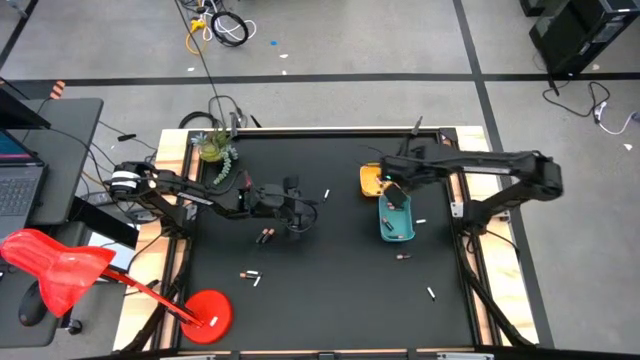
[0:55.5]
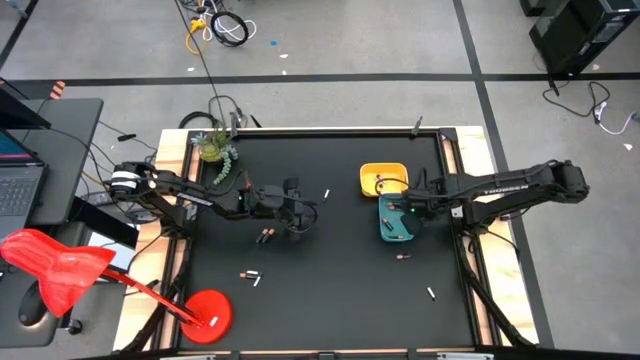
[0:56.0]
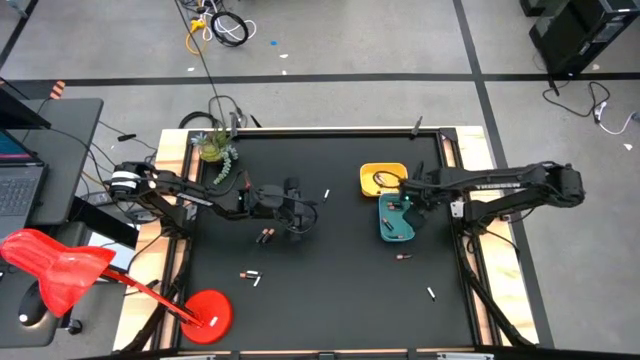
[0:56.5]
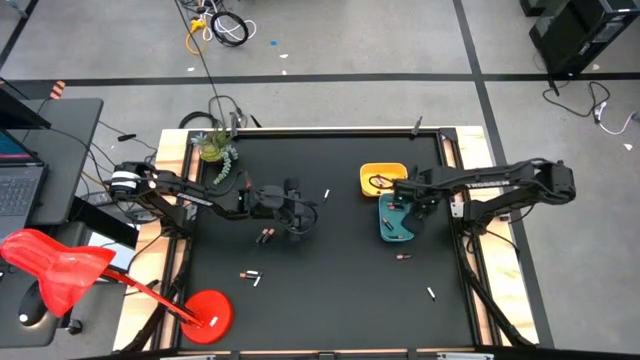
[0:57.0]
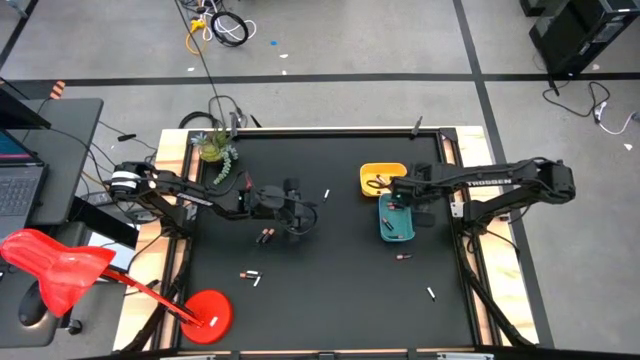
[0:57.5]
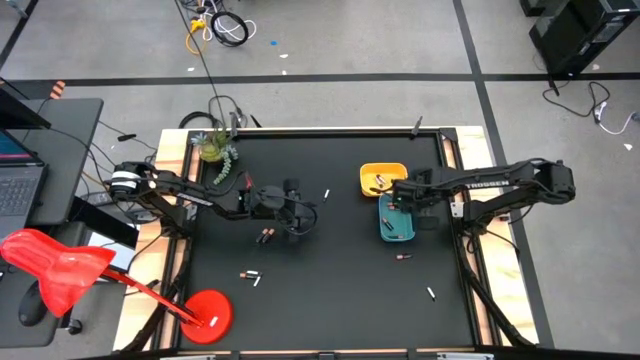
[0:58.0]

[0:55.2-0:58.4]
Task: Sort batteries
Put the silver black battery into the yellow bin

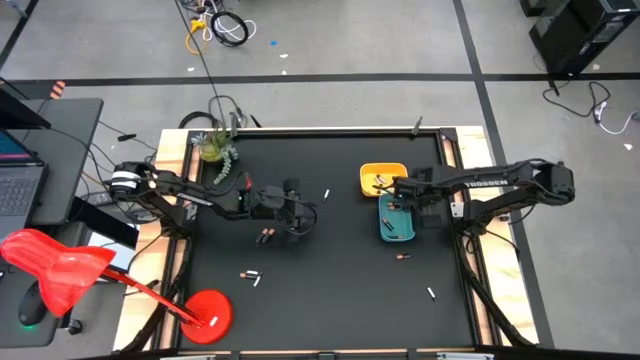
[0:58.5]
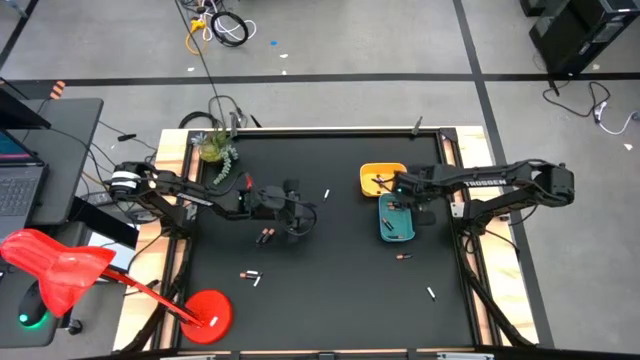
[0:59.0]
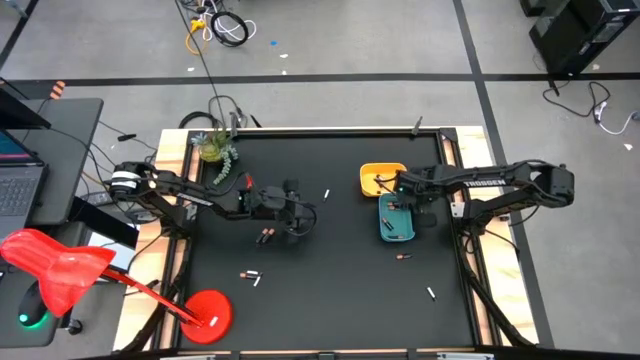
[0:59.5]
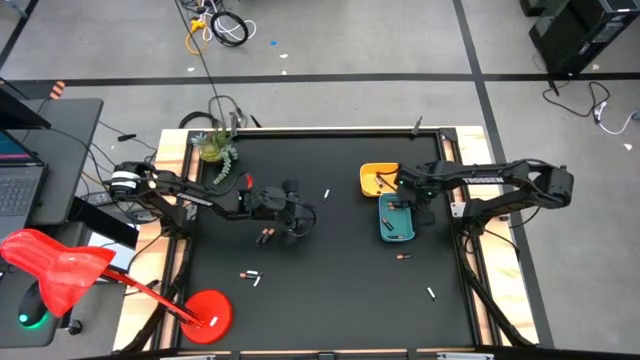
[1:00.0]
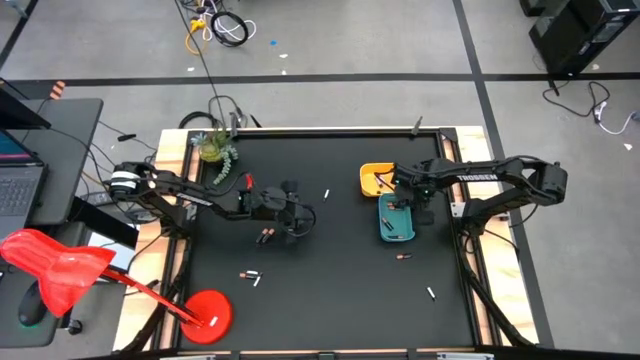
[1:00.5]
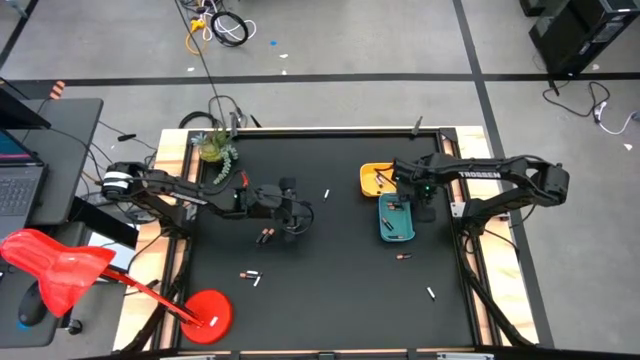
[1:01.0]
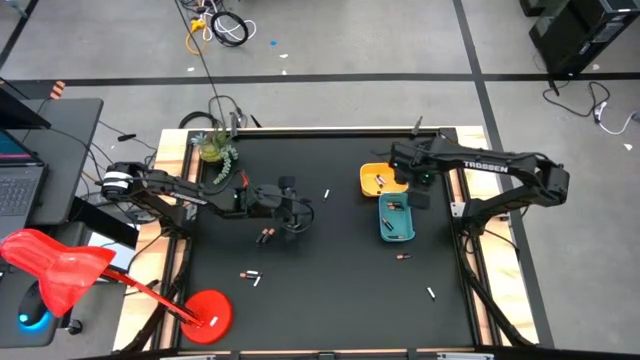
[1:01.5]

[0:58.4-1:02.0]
Put the silver black battery into the yellow bin

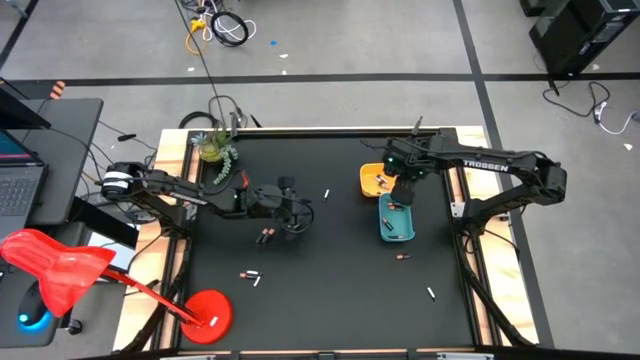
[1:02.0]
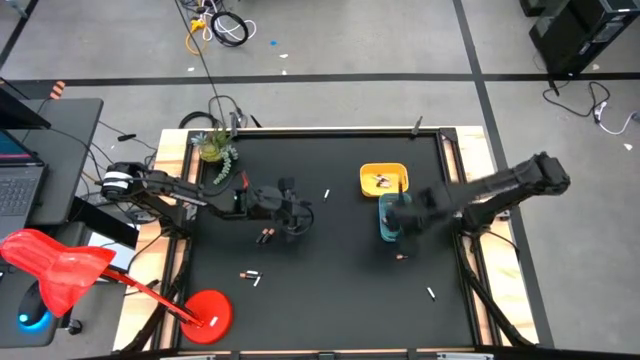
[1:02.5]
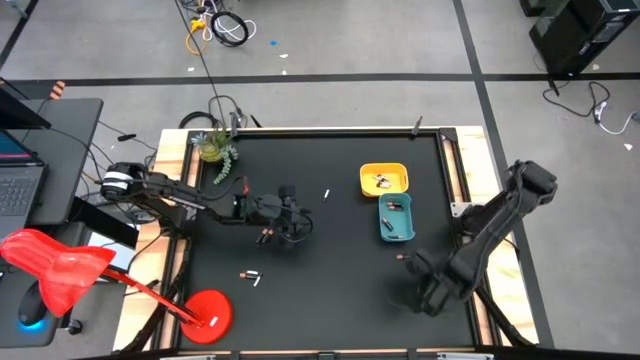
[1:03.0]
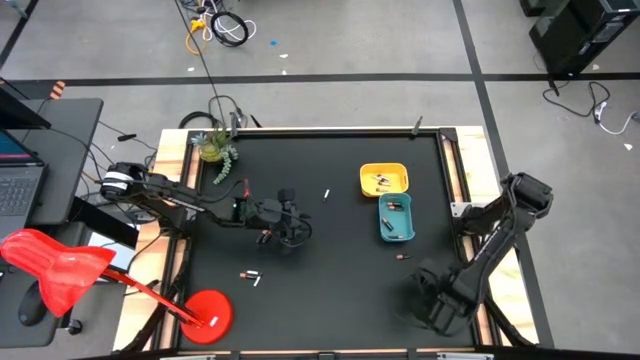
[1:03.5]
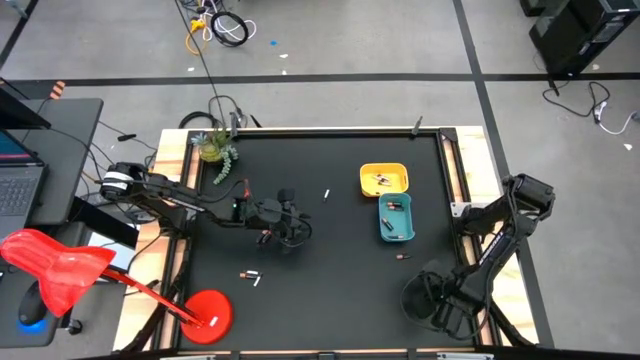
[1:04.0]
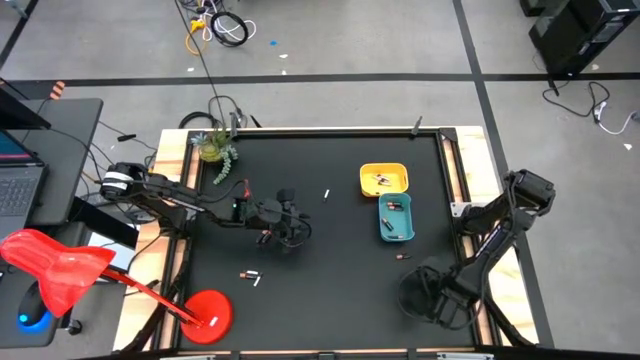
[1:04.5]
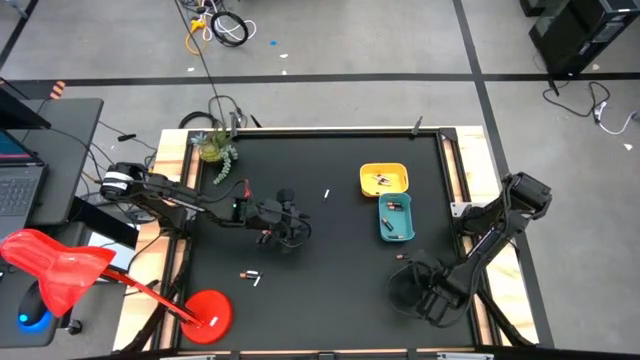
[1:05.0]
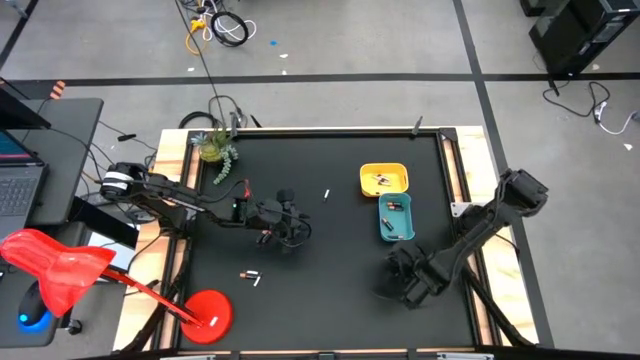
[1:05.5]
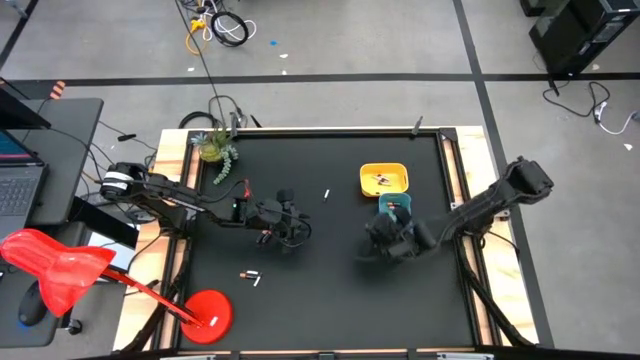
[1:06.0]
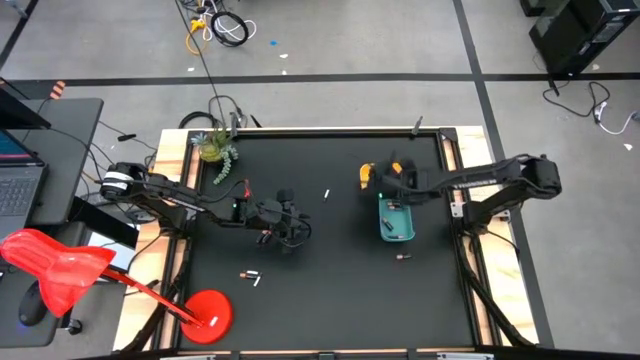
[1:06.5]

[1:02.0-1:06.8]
Put the silver black battery into the yellow bin

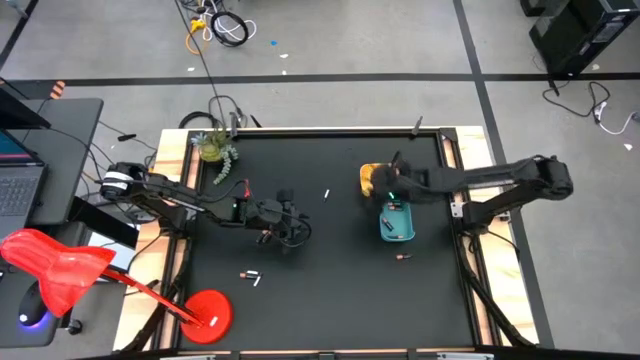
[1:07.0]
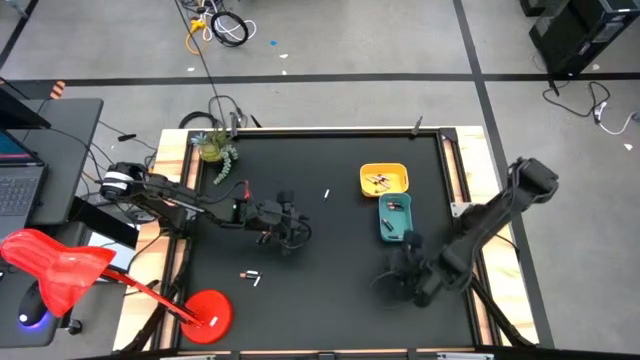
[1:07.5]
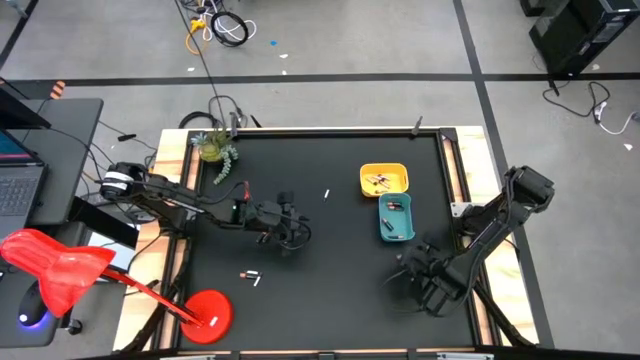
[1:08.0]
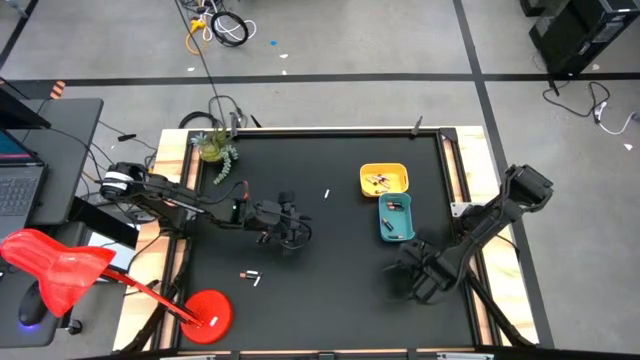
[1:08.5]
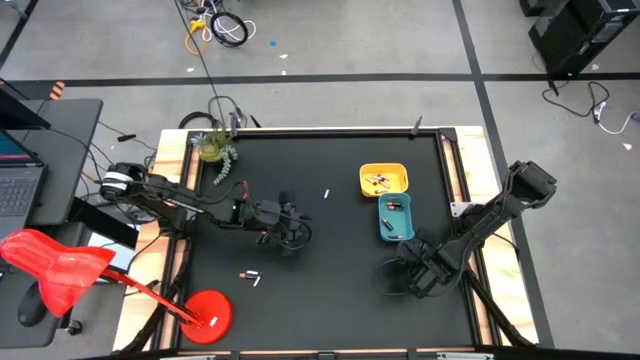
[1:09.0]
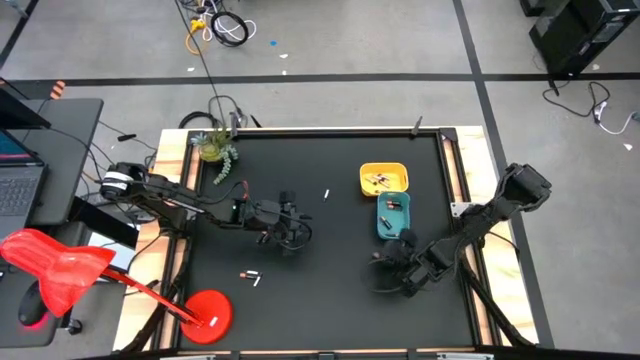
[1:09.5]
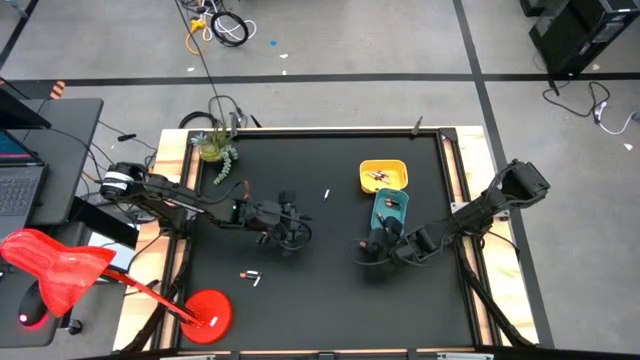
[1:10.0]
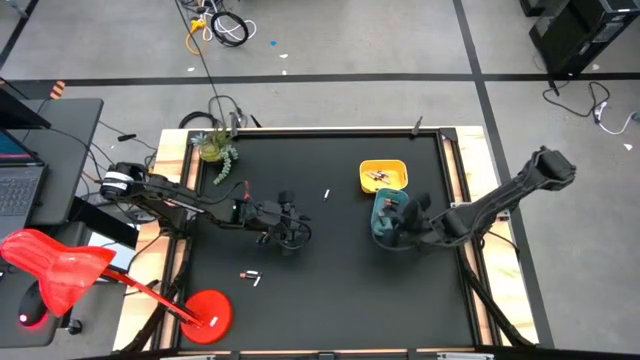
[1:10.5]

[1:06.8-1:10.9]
Put the gold black battery into the blue bin

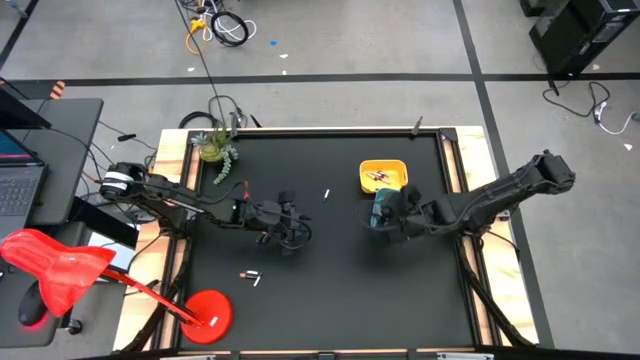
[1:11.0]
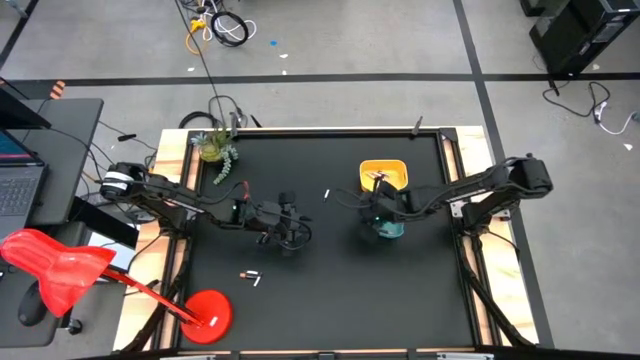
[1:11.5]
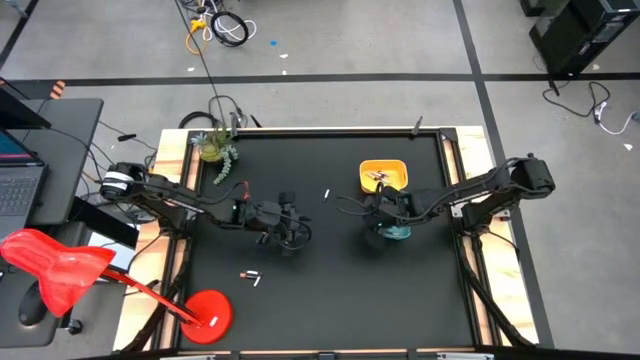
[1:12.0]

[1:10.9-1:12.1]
Adjust the blue bin on the table

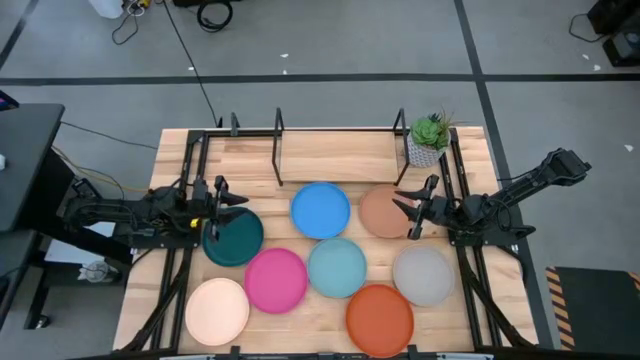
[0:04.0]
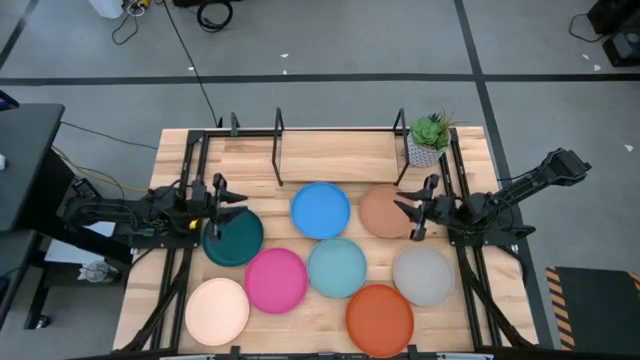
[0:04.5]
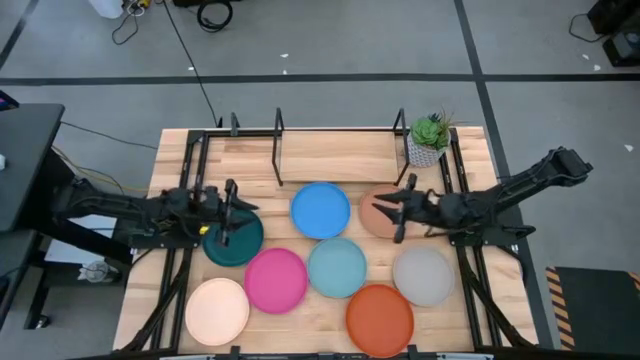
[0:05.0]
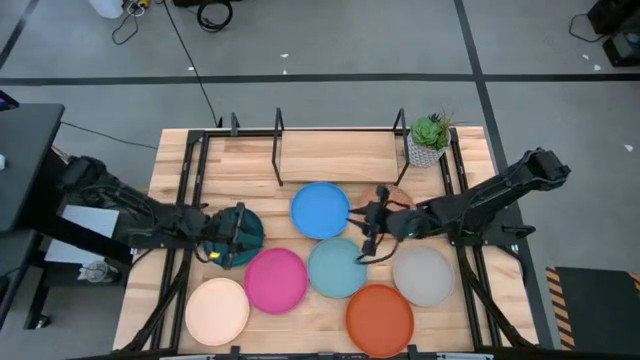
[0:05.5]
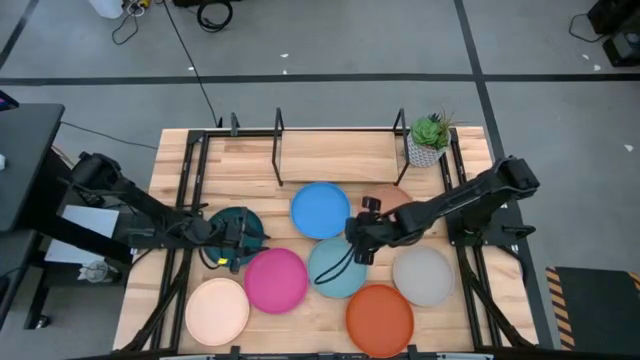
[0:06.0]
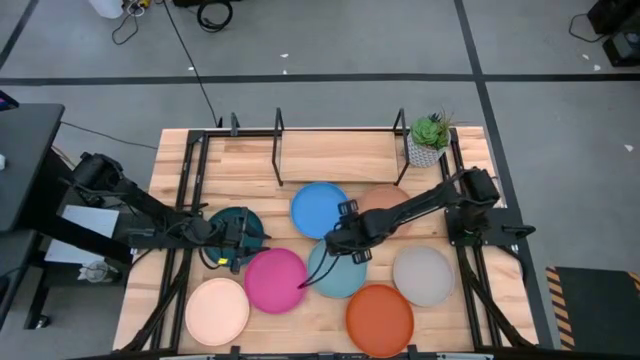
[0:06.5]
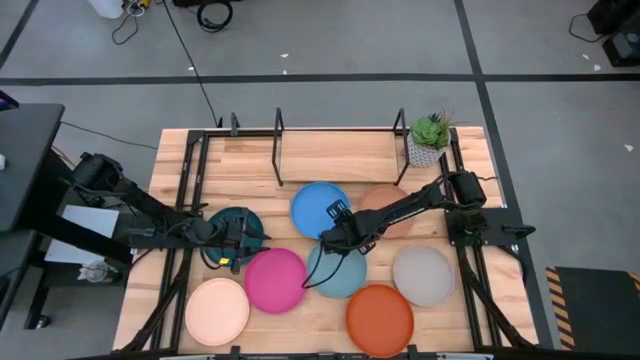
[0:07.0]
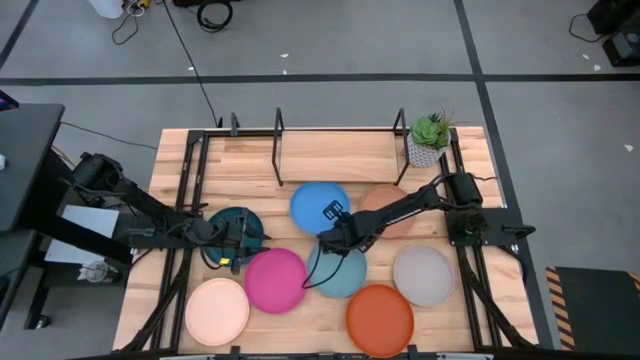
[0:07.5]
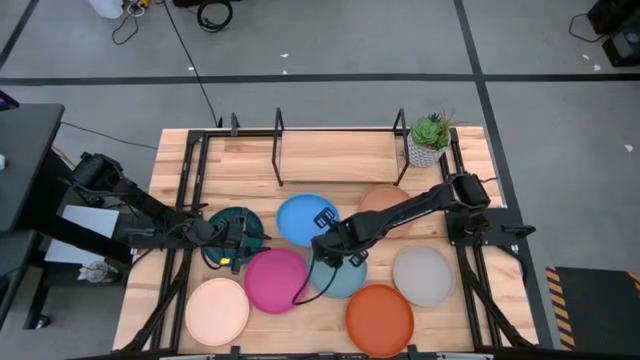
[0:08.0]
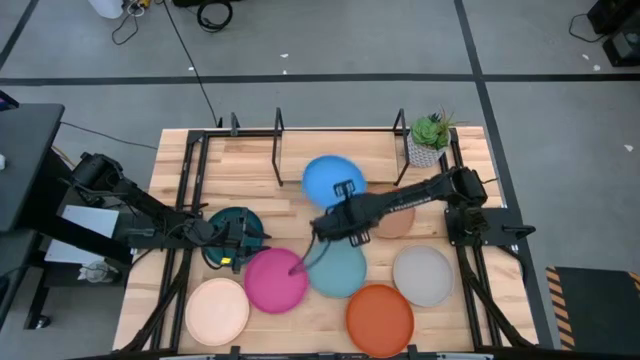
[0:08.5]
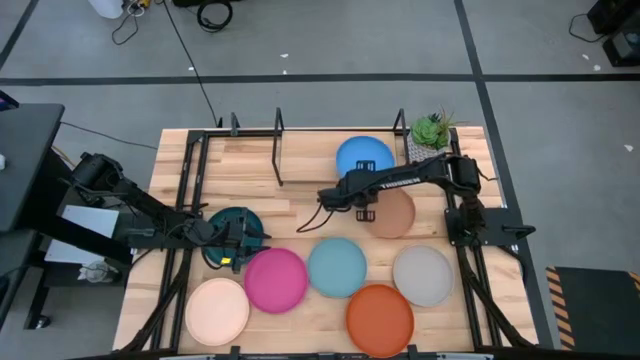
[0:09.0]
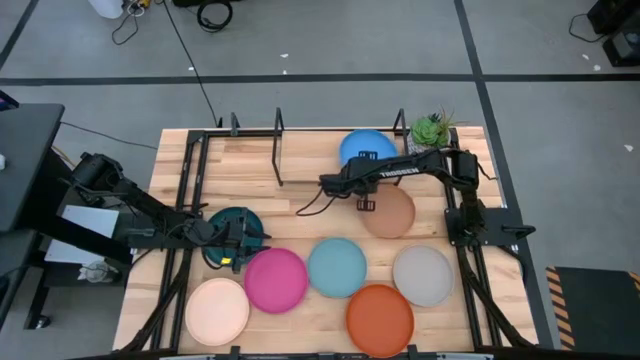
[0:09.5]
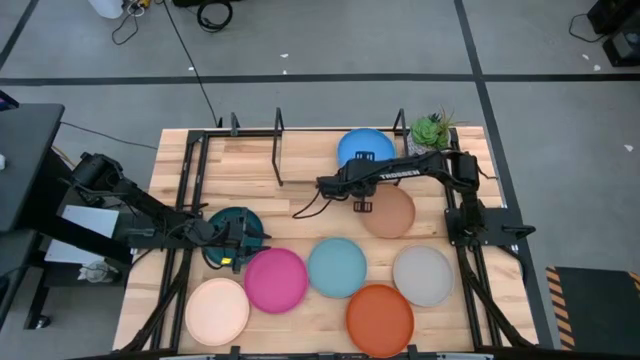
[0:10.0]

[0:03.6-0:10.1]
Task: Place and stack plates onto a shelf
Put the violet plate on the shelf
